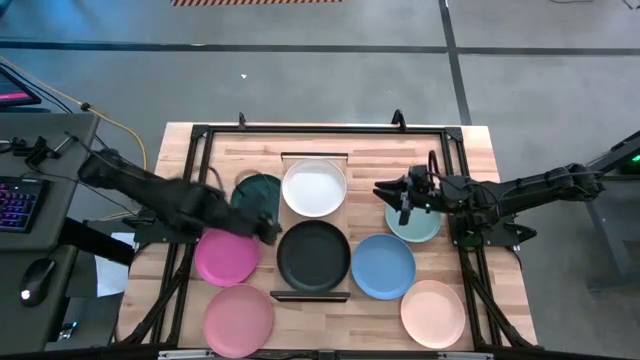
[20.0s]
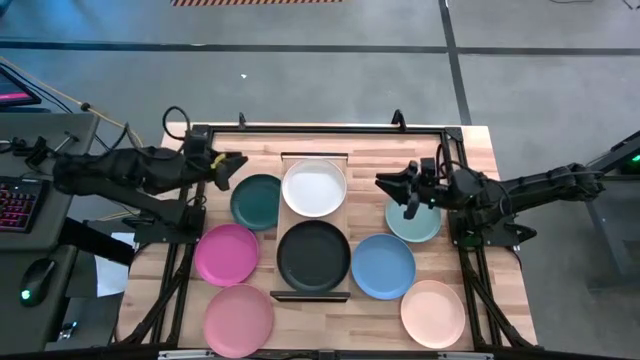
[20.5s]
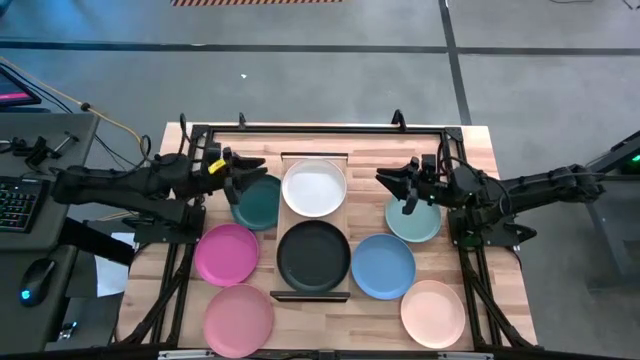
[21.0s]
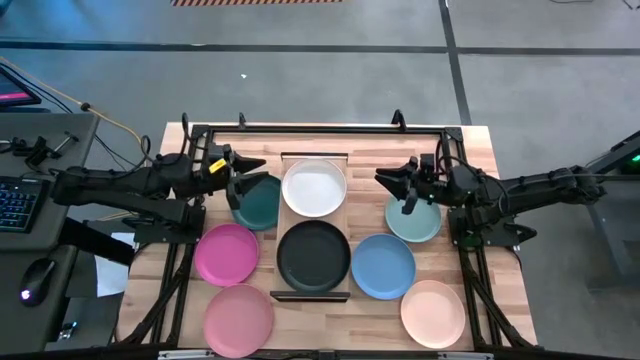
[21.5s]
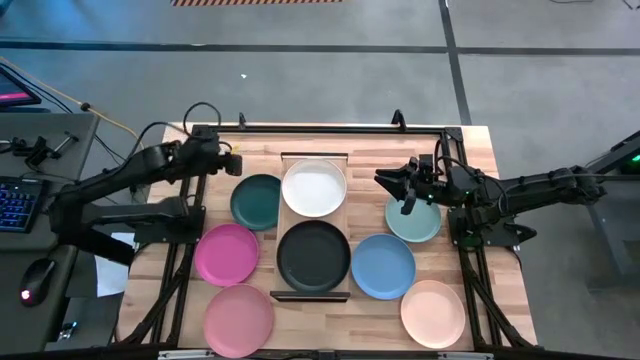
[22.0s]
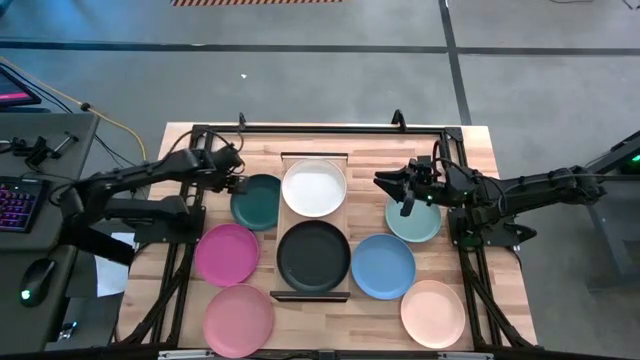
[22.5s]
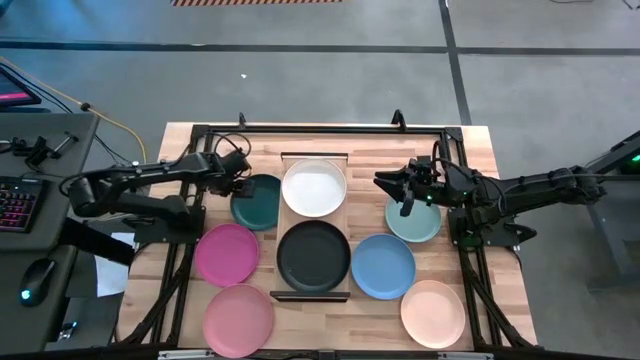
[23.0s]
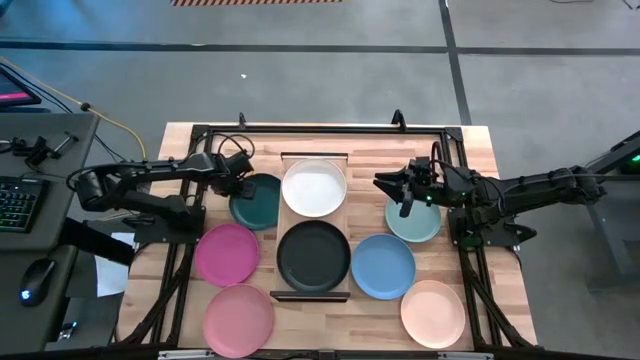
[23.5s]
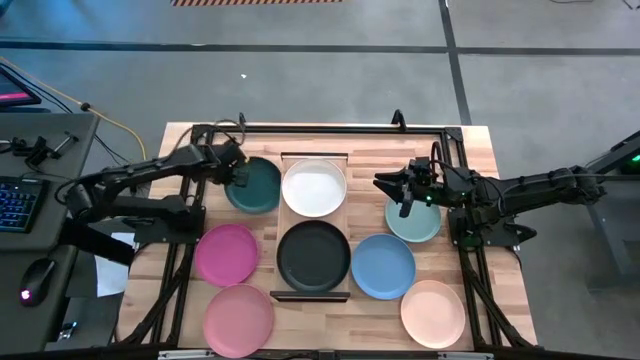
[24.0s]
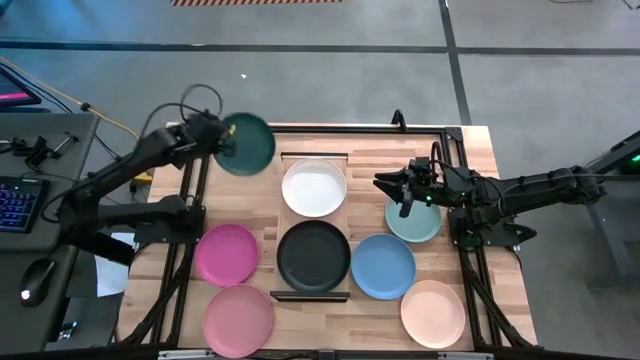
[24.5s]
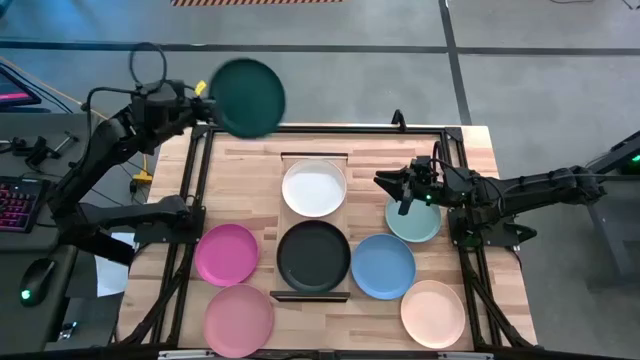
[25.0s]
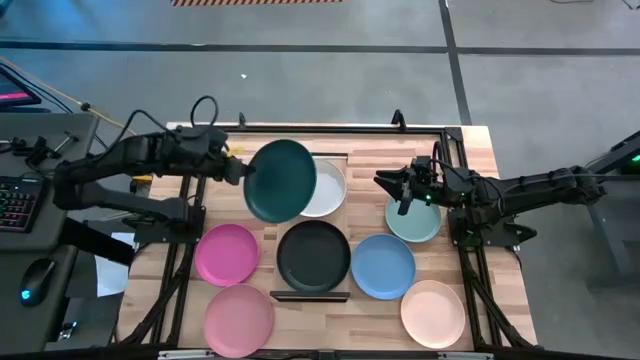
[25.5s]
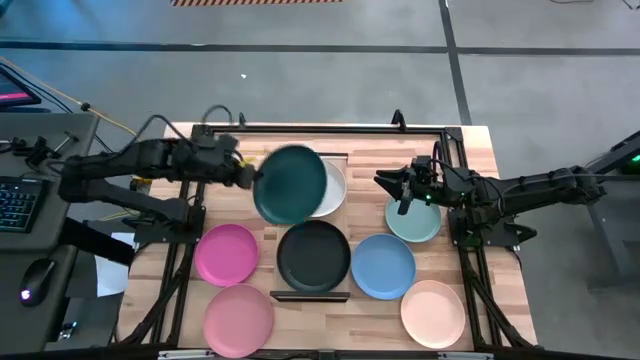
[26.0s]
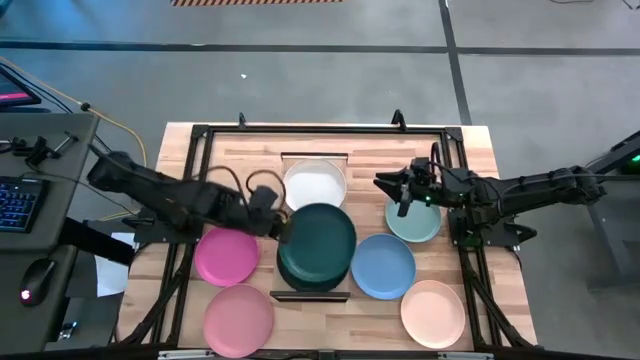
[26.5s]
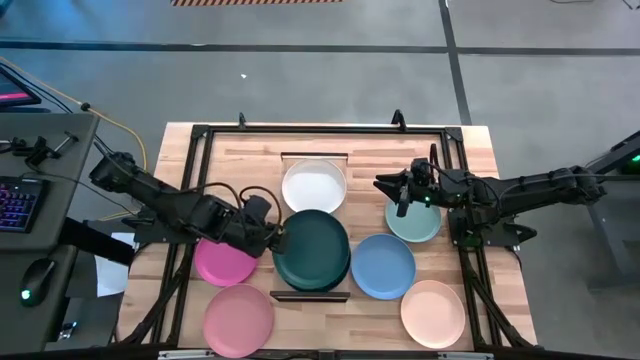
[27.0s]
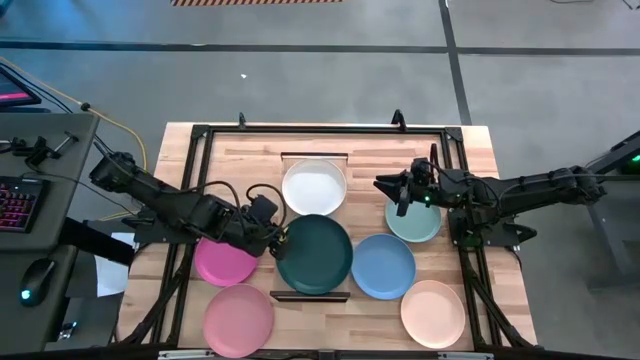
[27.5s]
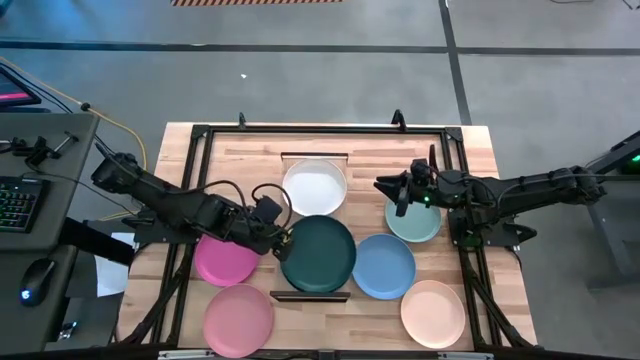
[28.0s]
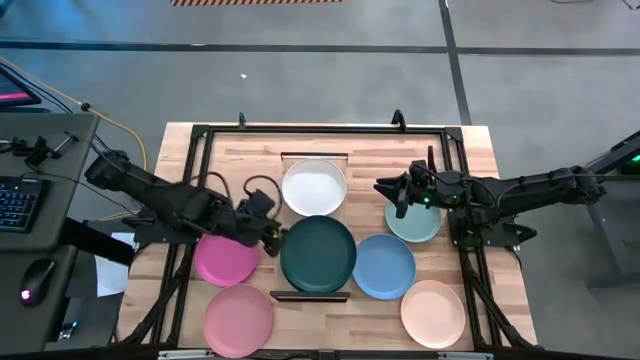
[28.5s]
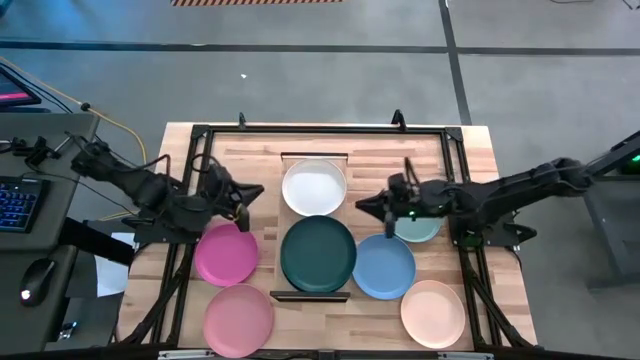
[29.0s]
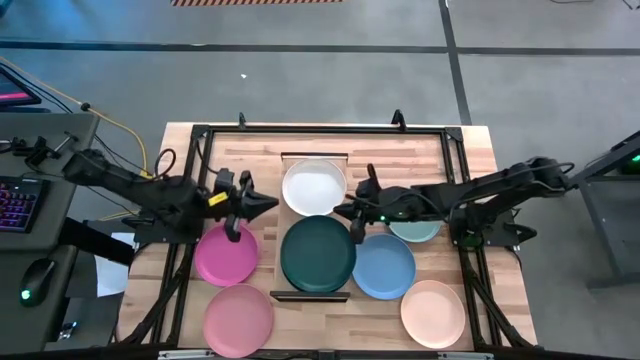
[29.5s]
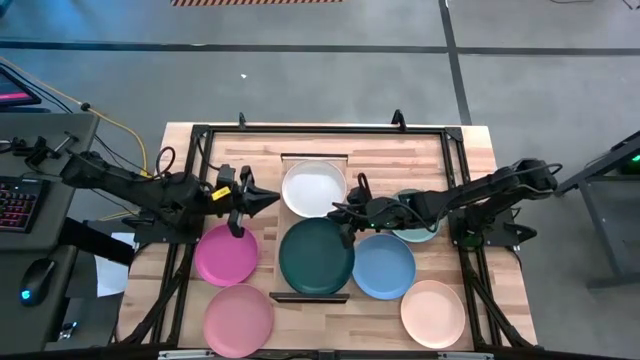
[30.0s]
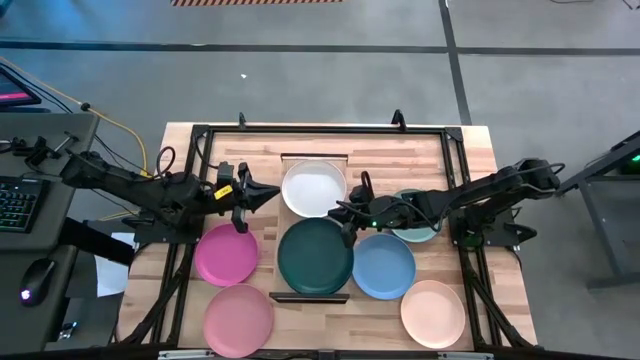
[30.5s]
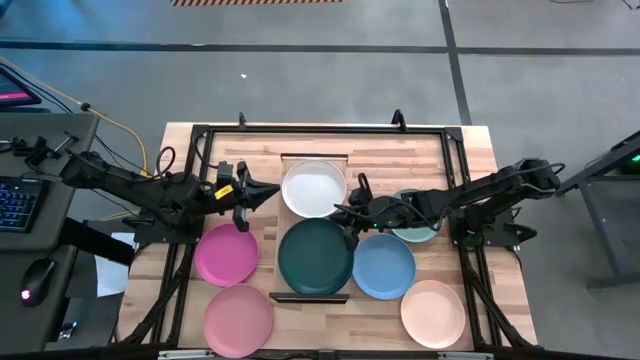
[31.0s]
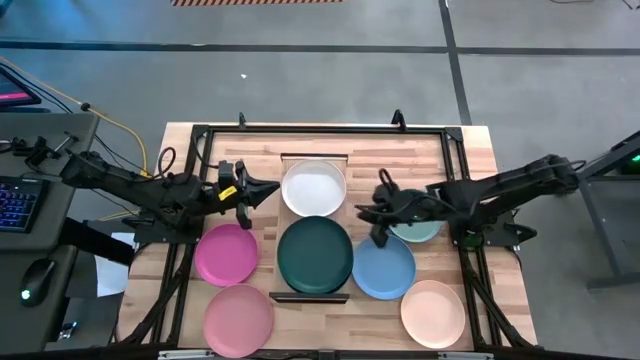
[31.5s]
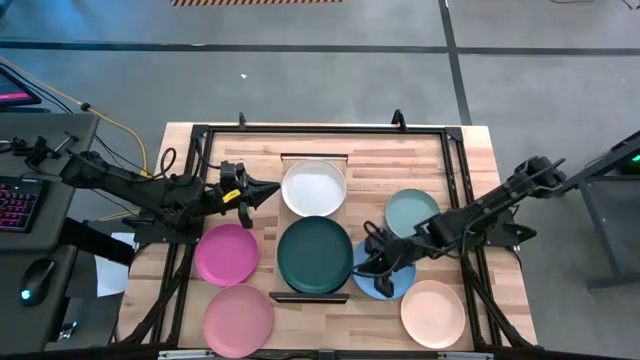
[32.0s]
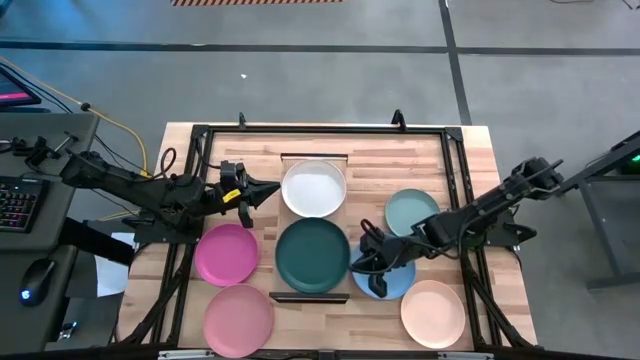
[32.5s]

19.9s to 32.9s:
Task: Place and stack plates onto a shelf
Stack the green plate on top of the black plate on the shelf

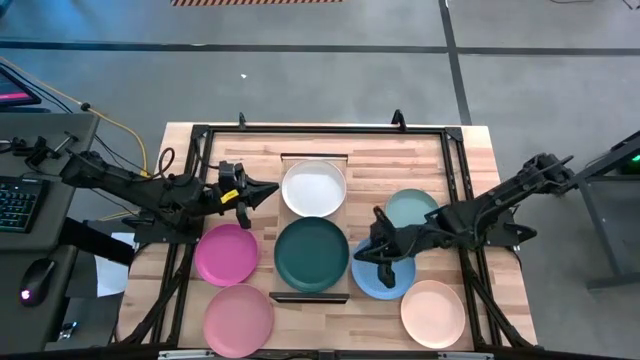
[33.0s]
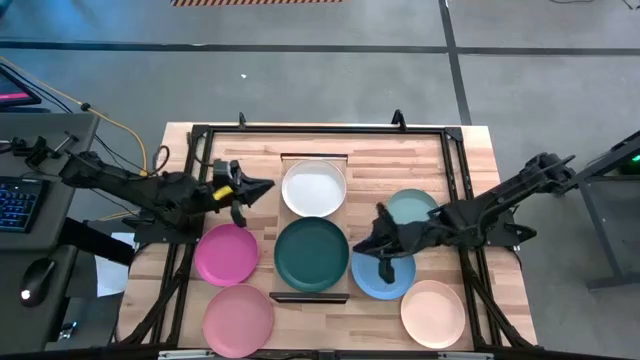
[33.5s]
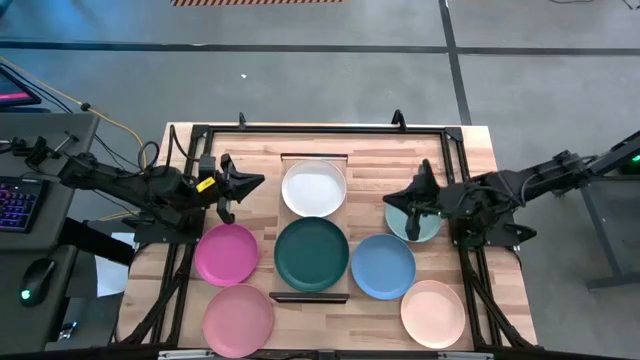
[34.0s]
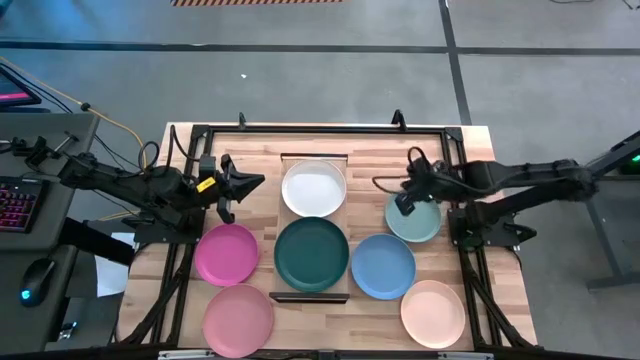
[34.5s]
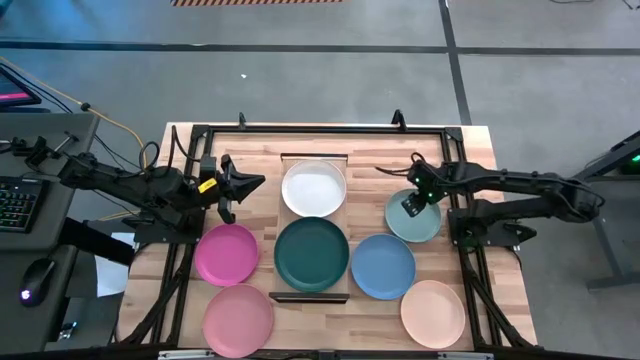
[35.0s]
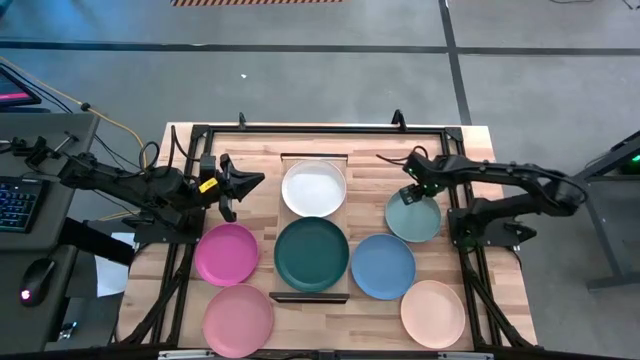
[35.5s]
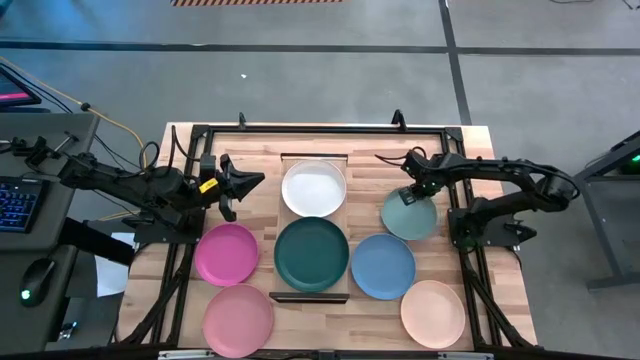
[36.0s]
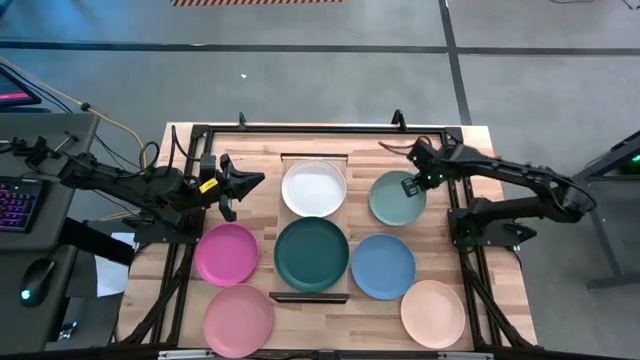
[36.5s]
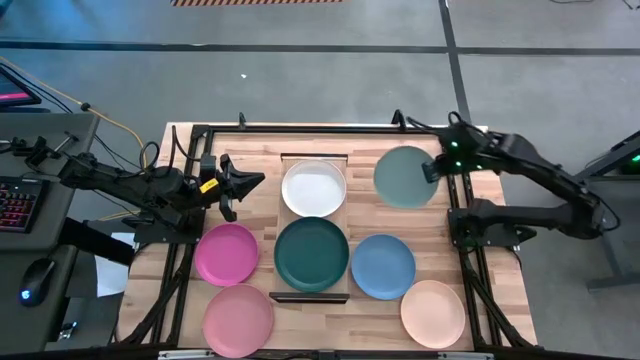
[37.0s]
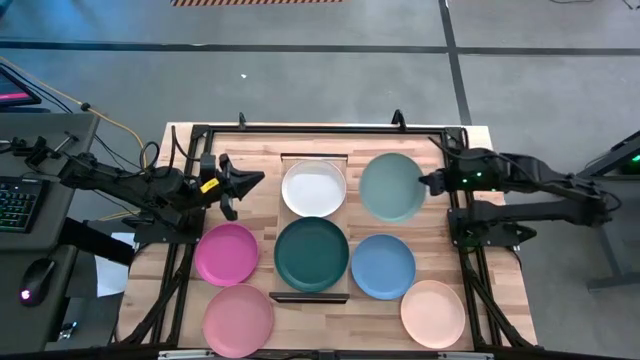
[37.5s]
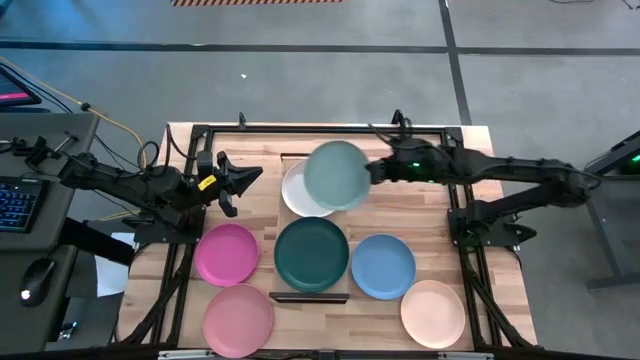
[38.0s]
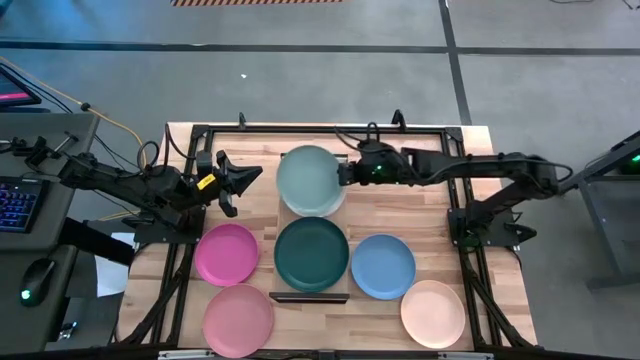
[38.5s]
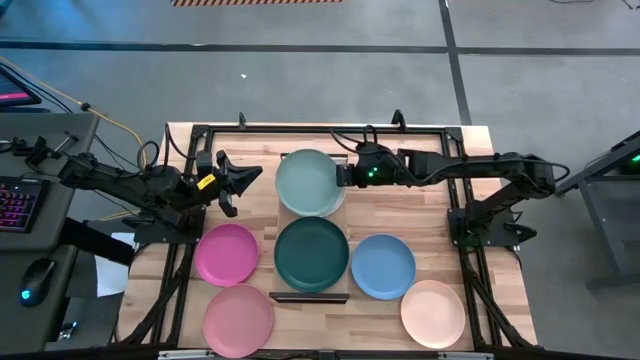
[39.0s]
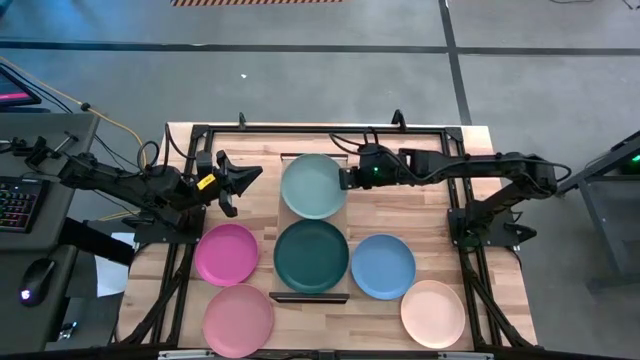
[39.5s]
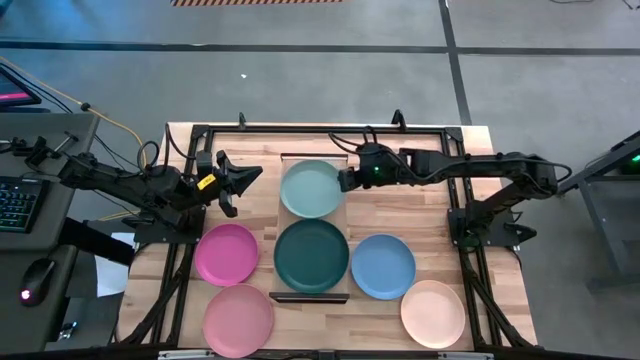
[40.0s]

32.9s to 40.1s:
Stack the light blue plate on top of the white plate on the shelf

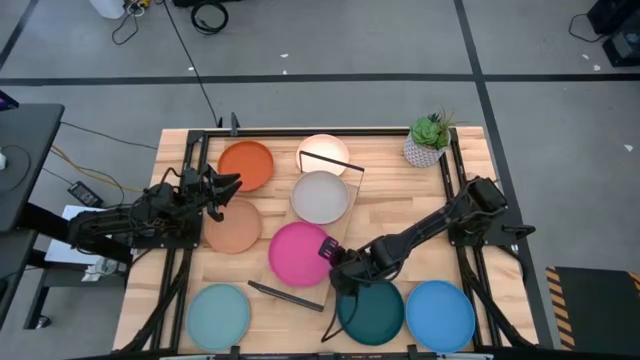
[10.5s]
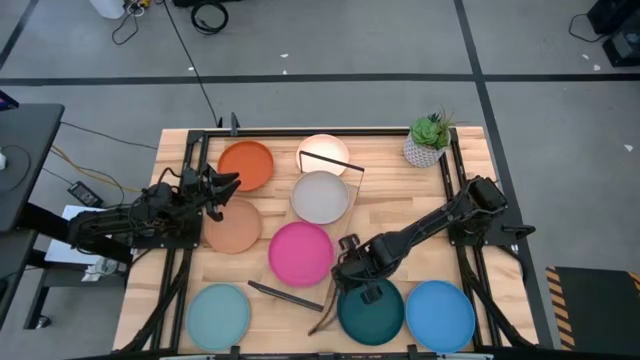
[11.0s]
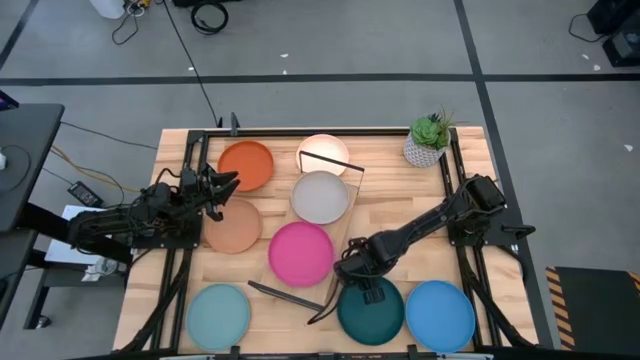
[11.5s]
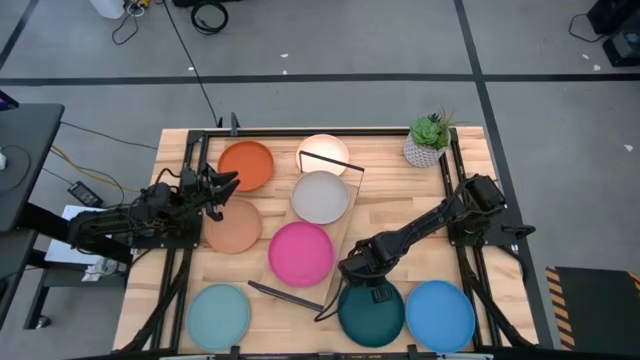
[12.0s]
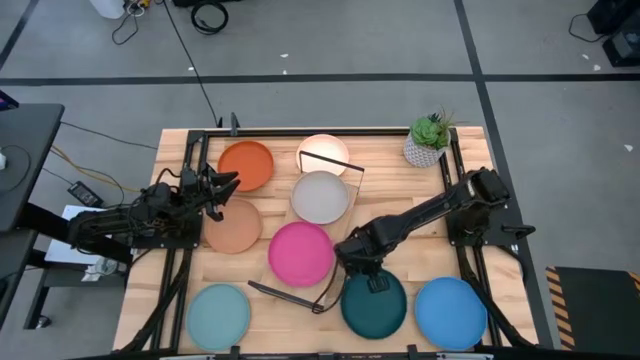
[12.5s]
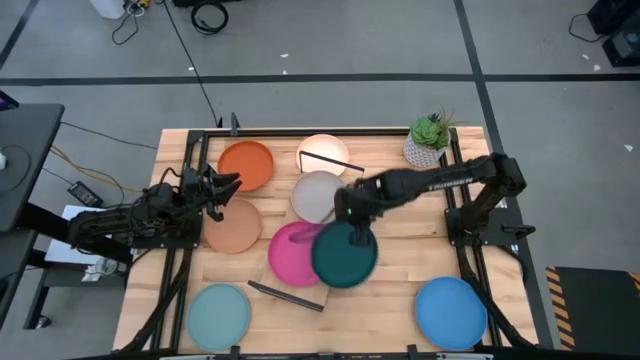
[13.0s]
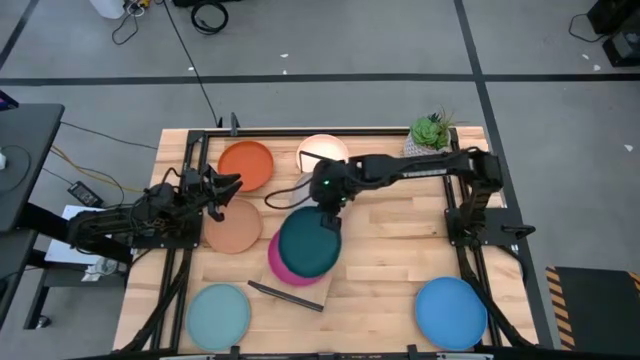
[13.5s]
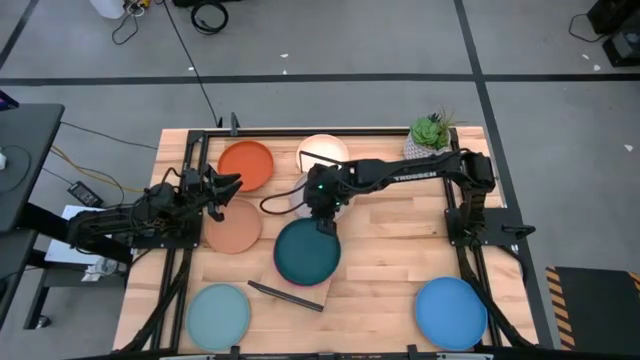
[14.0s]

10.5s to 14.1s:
Task: Place and stack plates onto a shelf
Stack the dark blue plate on top of the pink plate on the shelf
